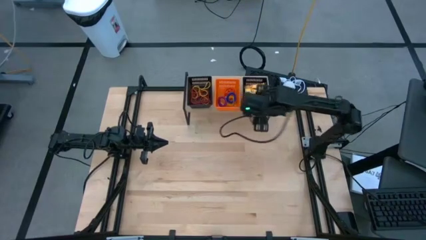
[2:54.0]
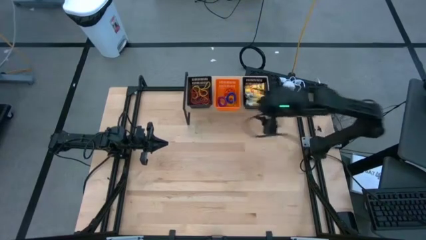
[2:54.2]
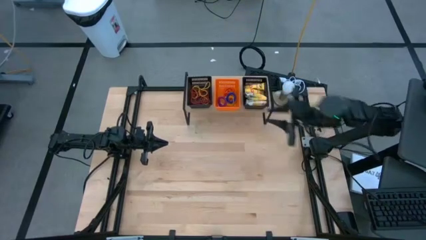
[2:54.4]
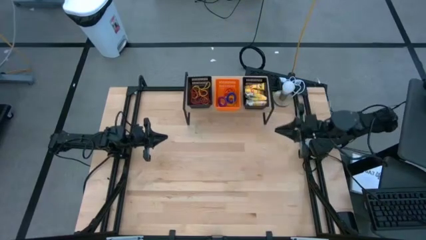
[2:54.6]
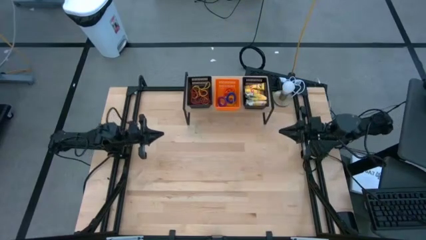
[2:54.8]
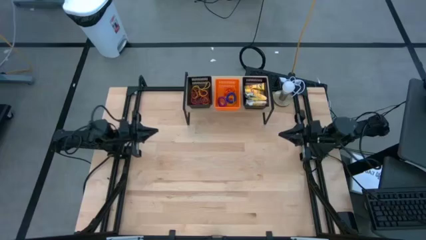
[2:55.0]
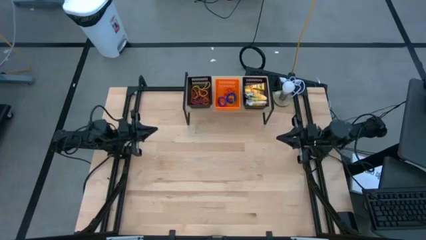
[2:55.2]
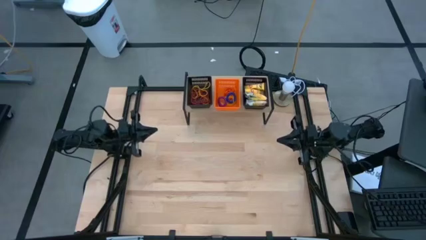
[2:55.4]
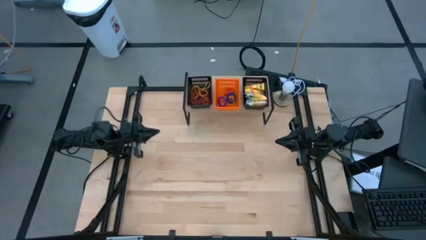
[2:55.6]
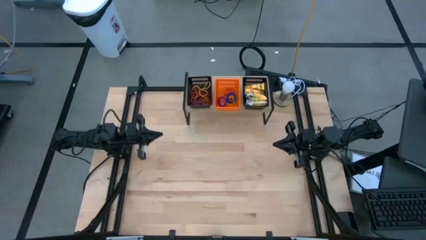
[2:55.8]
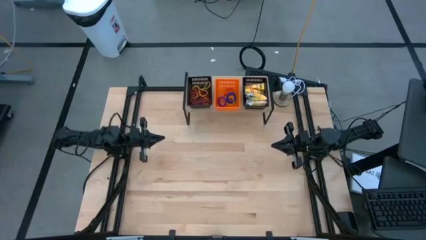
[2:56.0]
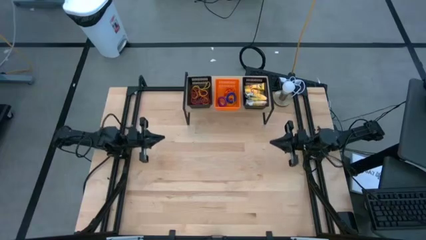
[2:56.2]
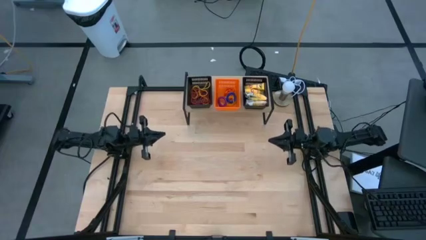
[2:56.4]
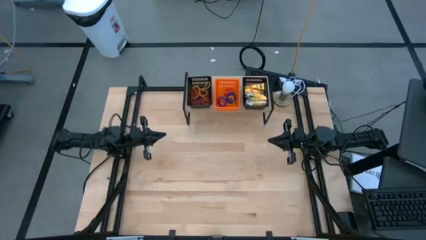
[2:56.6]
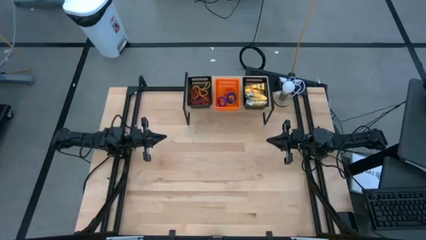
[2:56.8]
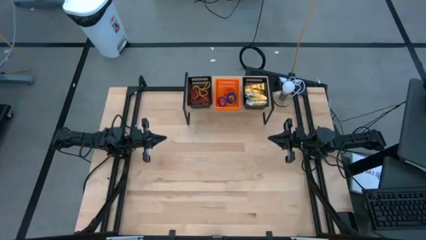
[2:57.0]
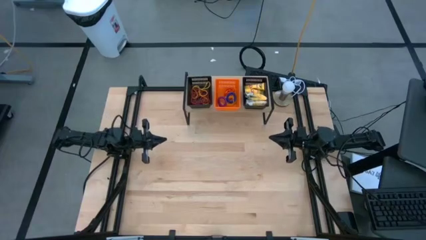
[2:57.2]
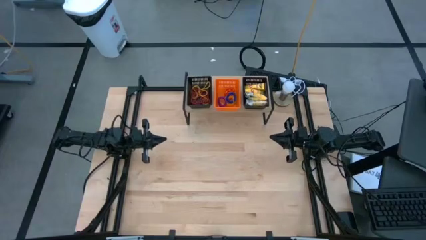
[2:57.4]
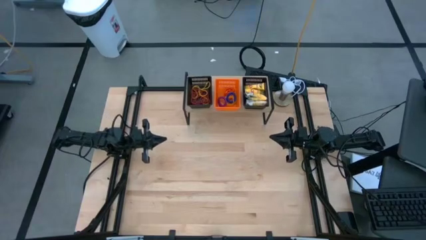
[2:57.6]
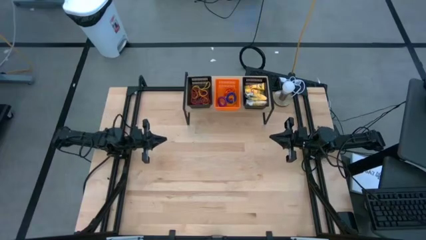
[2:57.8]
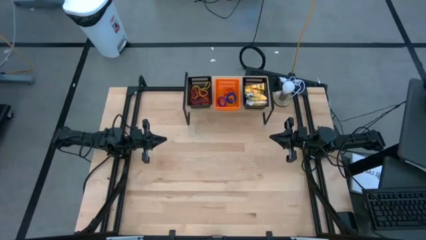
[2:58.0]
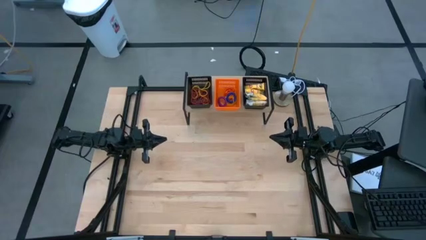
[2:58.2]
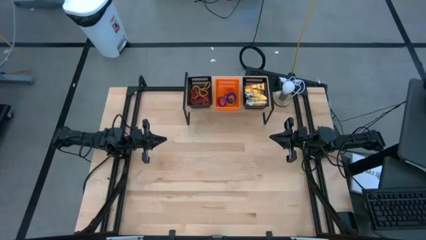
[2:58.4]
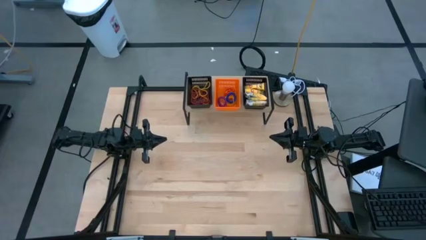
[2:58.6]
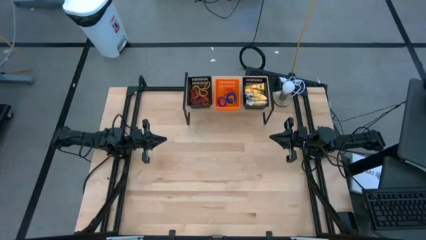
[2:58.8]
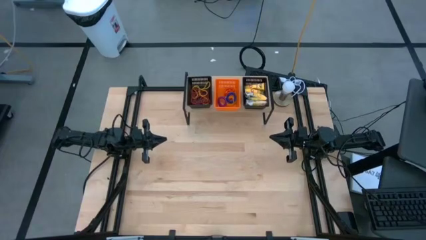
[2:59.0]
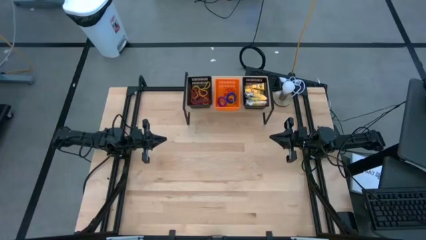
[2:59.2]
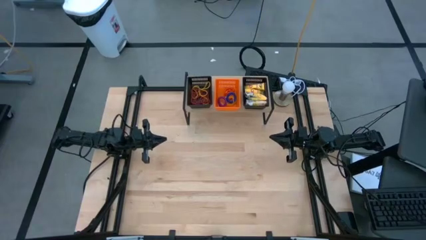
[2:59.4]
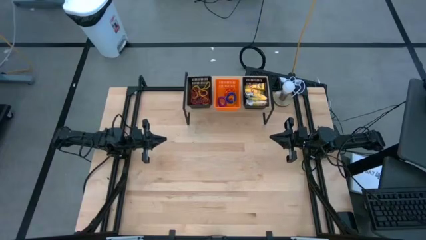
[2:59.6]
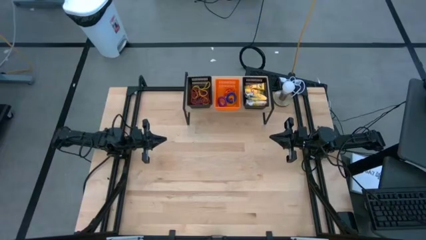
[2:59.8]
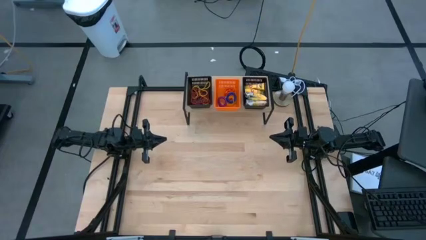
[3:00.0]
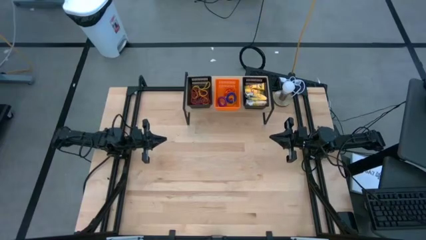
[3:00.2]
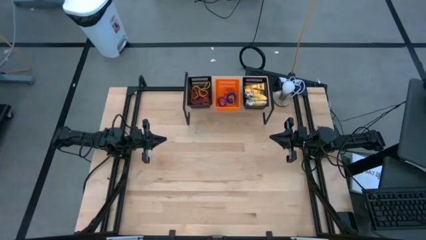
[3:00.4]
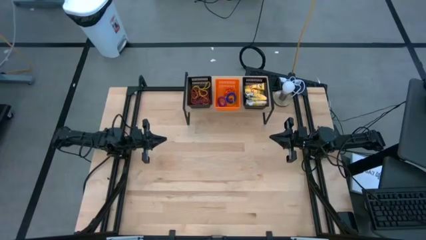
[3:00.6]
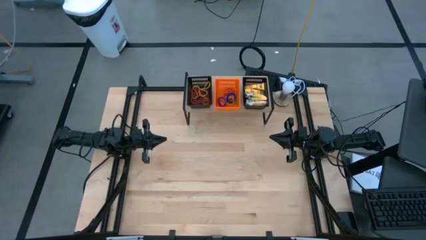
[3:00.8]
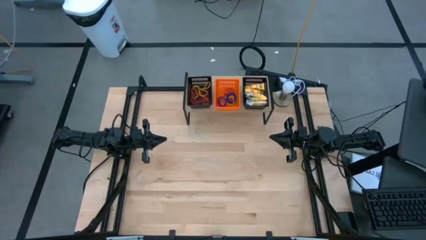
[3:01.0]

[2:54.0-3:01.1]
Task: Pick & Place Office Desk Supplies
Return to Home Position

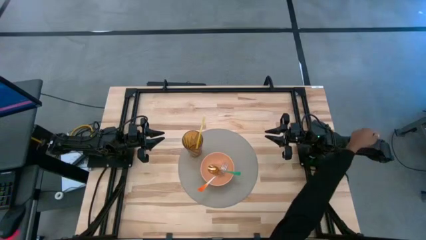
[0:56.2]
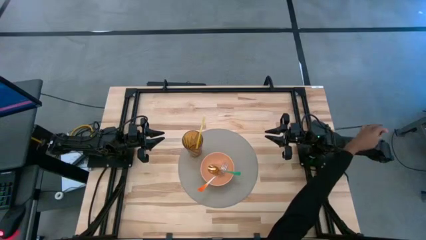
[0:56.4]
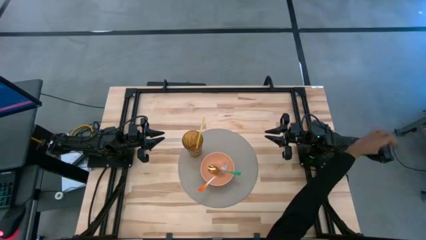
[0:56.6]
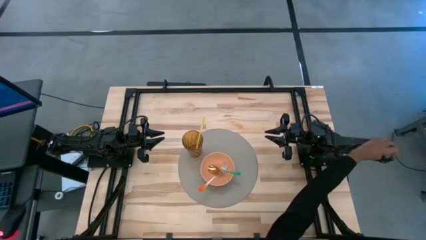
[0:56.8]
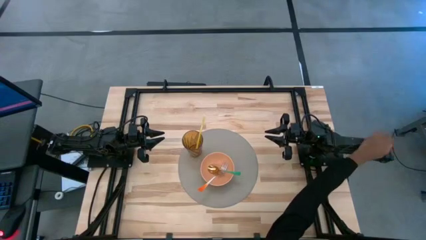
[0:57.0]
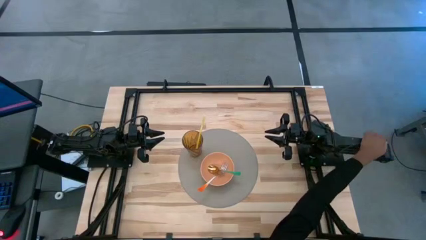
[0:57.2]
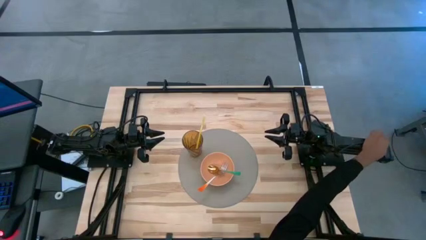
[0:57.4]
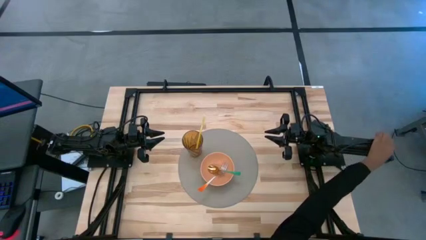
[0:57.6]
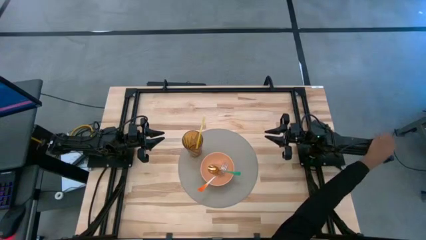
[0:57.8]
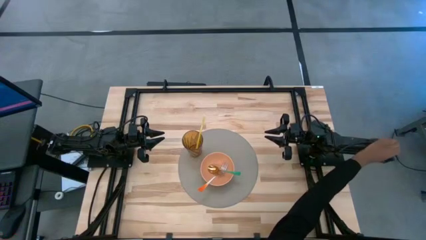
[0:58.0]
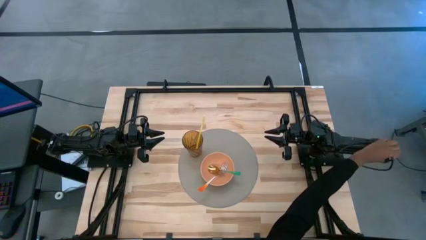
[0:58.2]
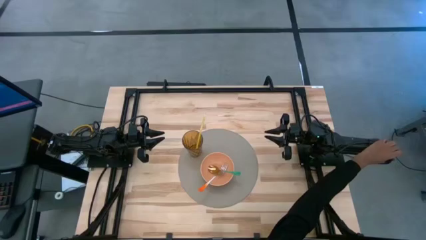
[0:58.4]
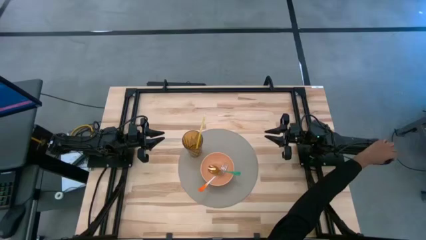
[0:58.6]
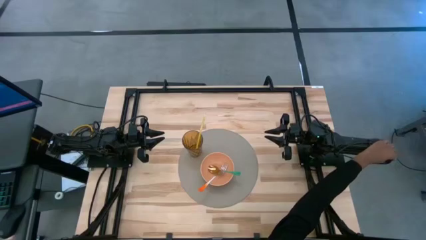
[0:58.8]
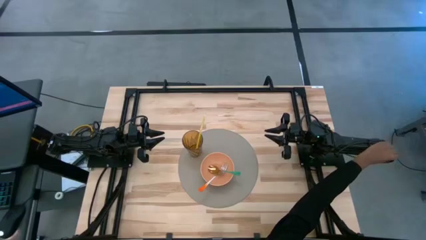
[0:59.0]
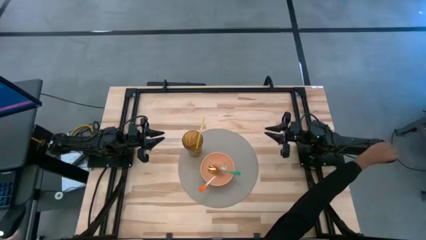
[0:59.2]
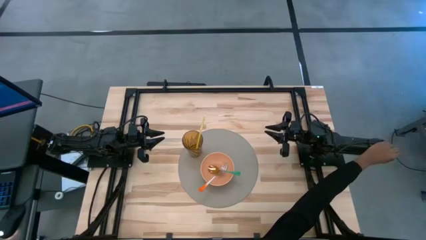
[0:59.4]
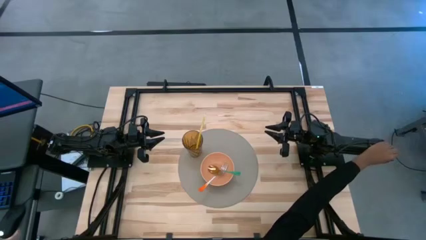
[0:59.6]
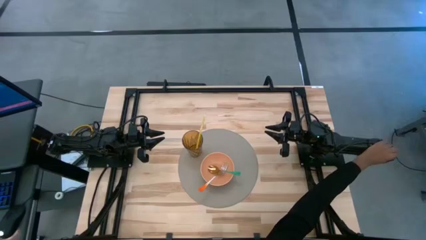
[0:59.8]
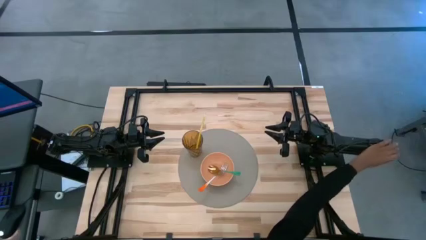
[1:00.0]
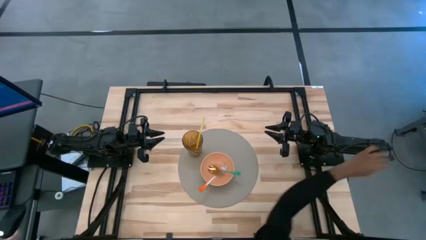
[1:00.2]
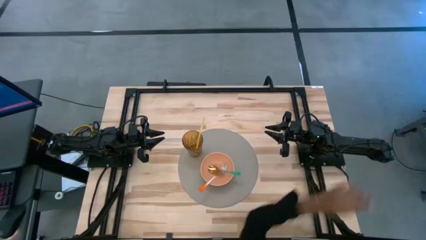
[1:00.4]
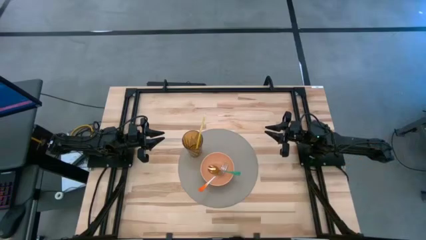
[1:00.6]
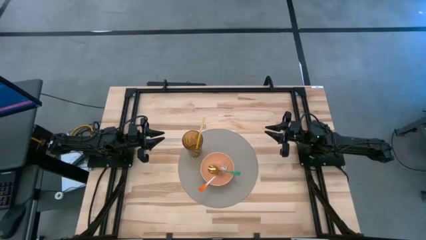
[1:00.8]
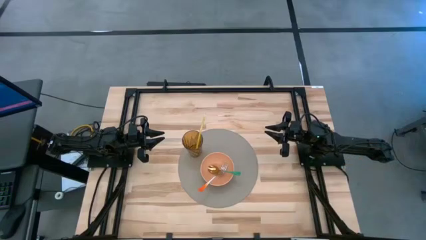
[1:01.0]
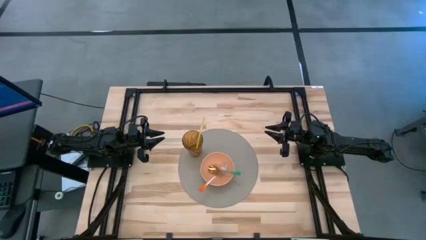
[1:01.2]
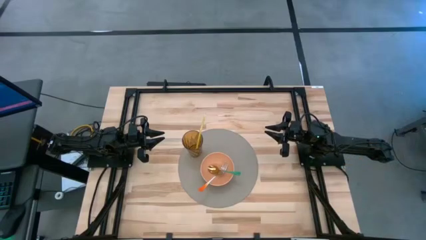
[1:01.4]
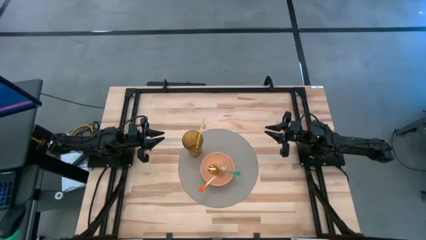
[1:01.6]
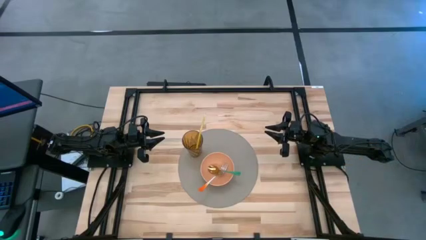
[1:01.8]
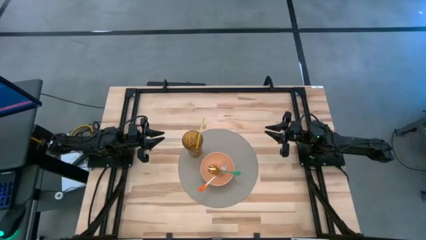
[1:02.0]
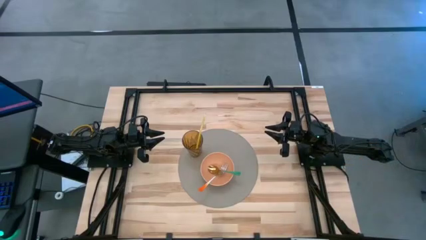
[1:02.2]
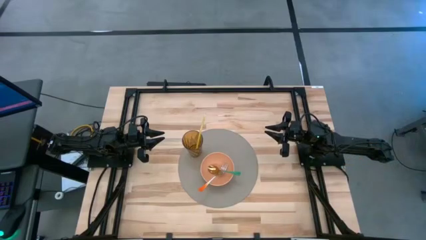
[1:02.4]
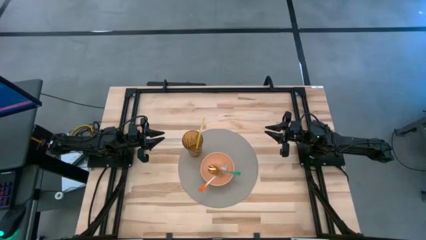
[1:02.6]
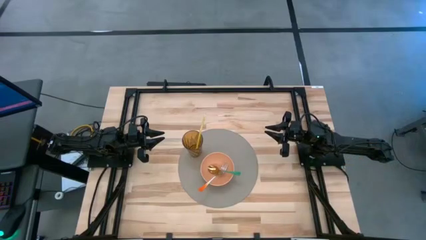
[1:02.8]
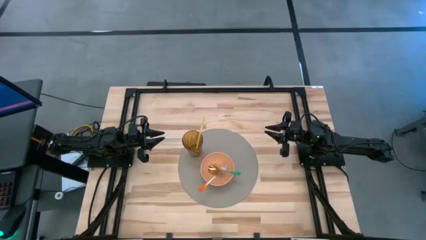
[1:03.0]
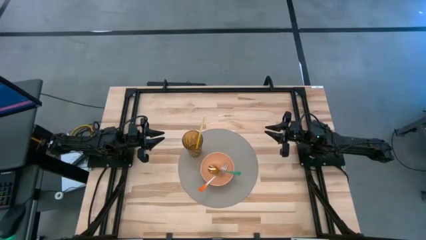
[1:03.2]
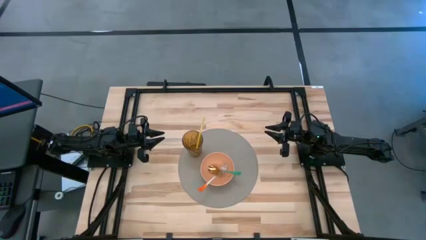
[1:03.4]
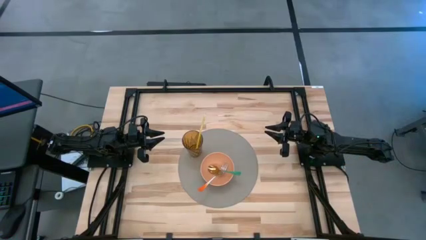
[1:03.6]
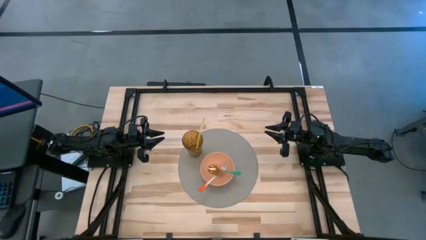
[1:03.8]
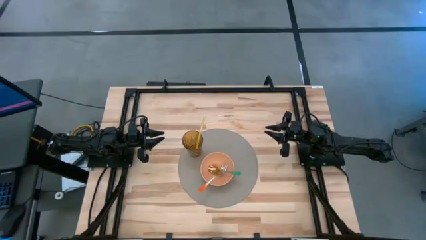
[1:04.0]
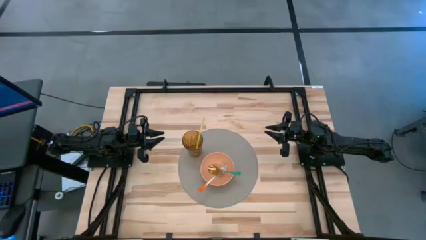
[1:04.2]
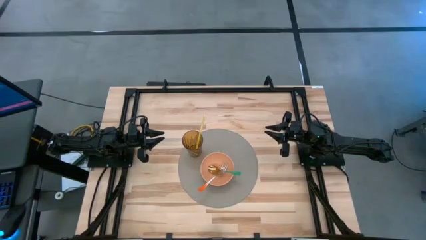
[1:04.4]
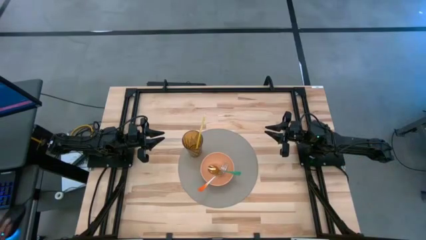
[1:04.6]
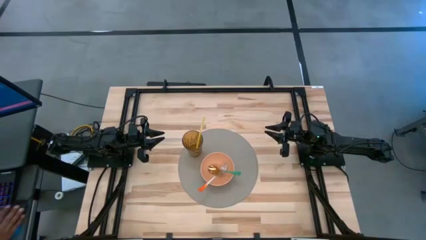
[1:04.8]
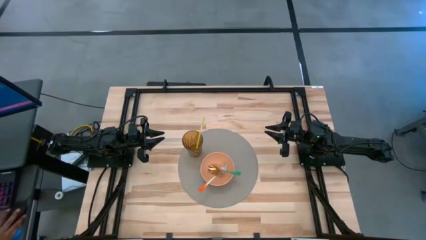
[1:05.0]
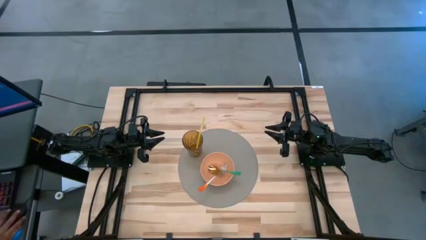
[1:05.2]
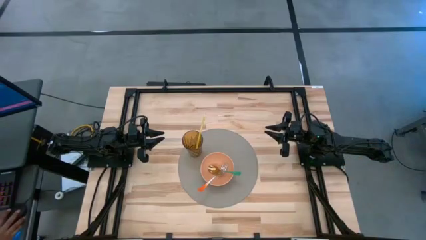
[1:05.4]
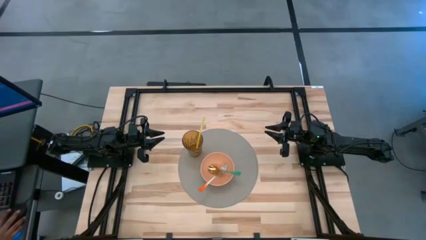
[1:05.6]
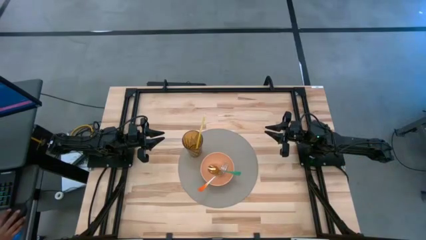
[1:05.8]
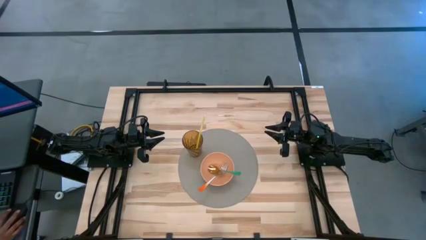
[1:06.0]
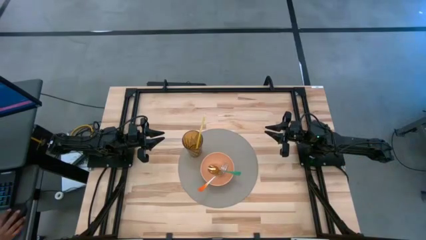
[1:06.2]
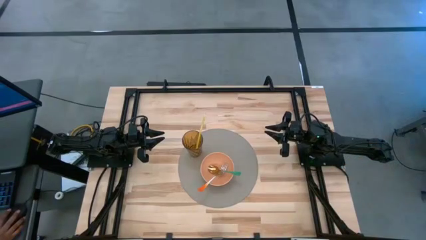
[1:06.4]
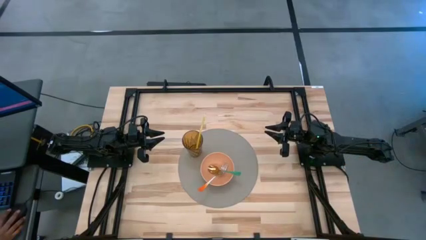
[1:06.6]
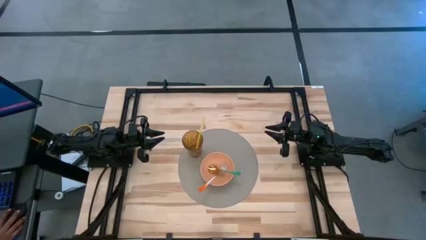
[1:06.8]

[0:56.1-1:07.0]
Task: Pick & Place Utensil
Return to Home Position
